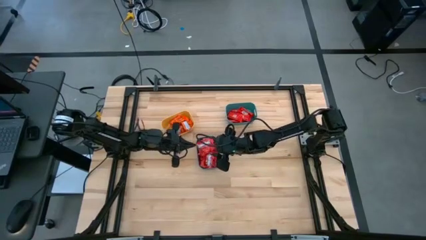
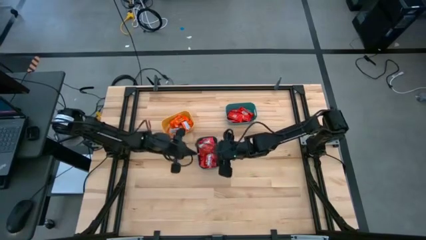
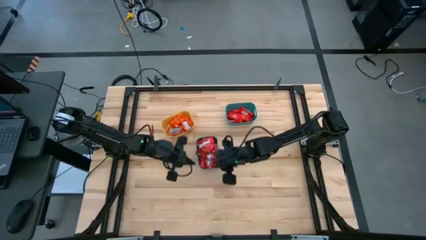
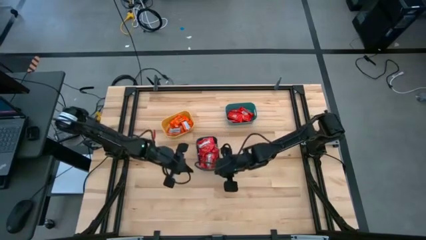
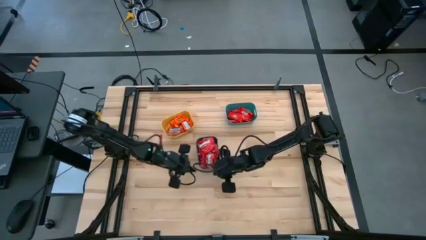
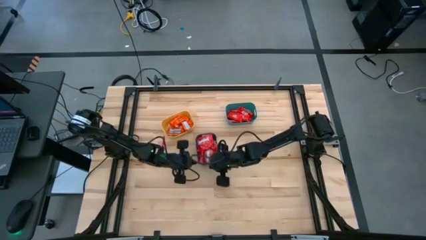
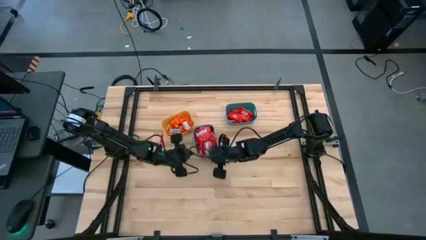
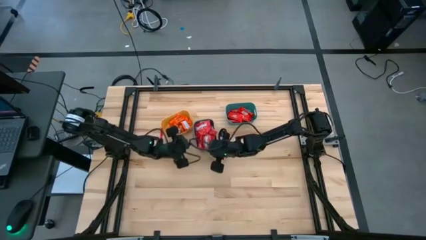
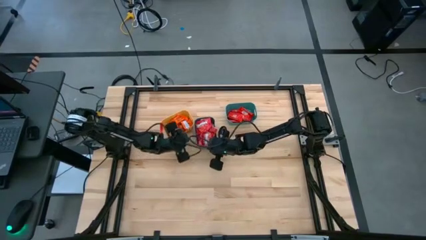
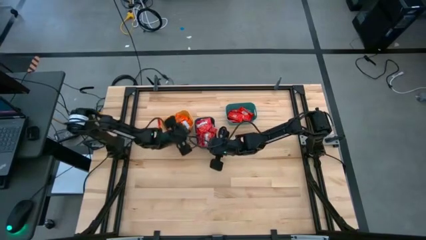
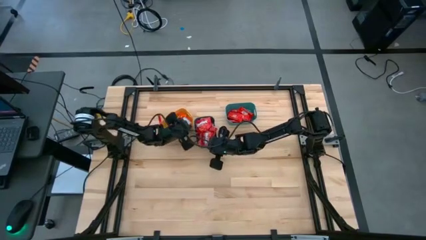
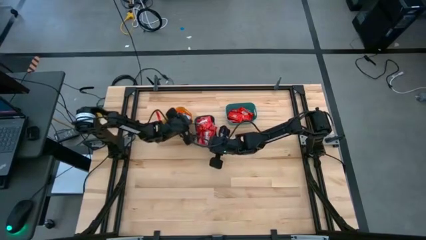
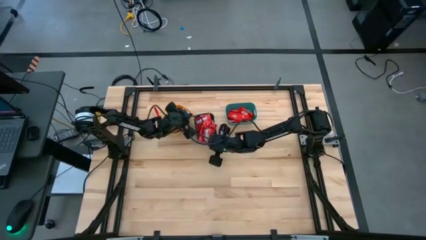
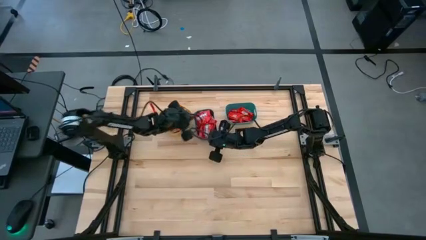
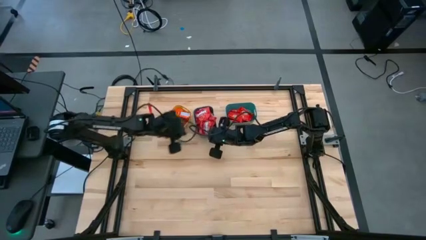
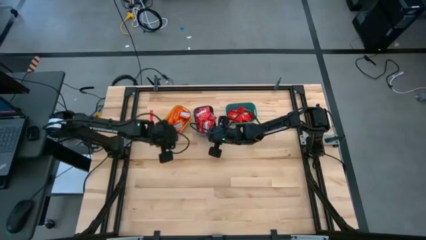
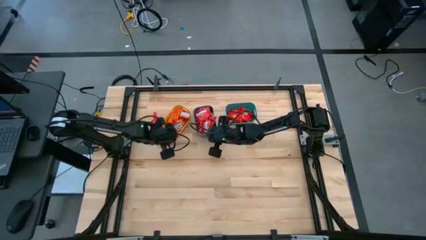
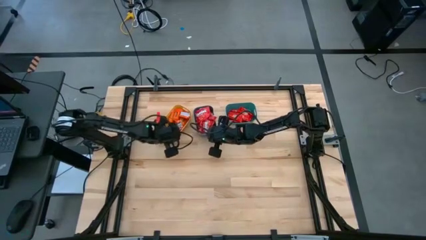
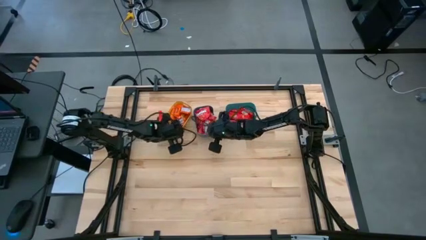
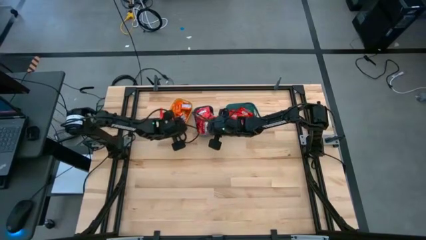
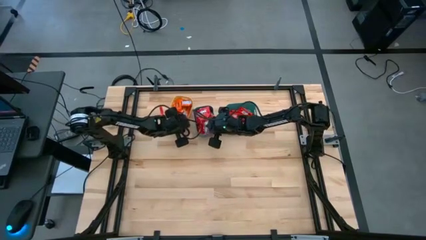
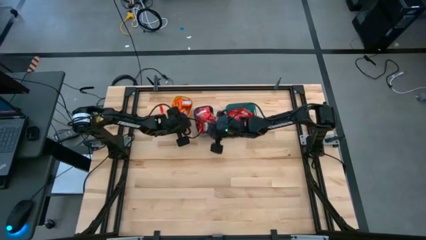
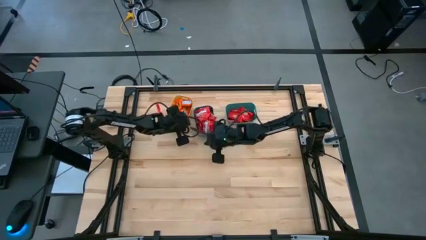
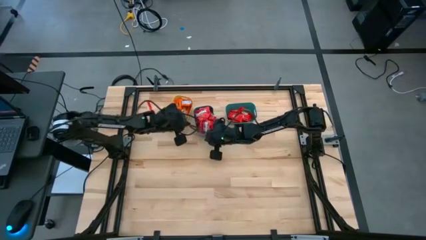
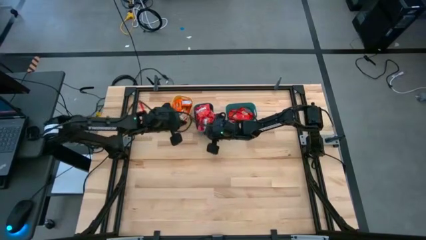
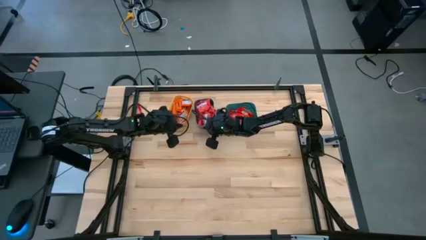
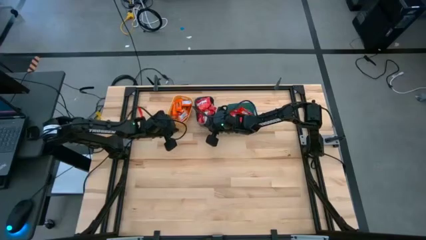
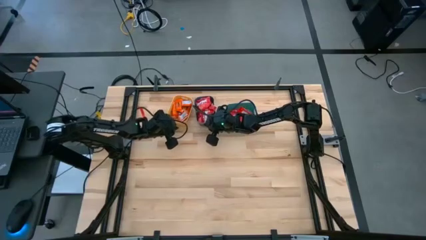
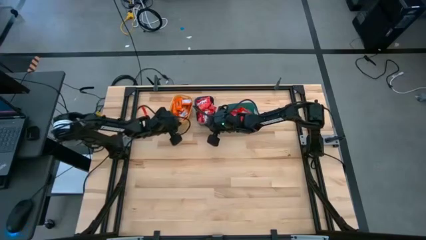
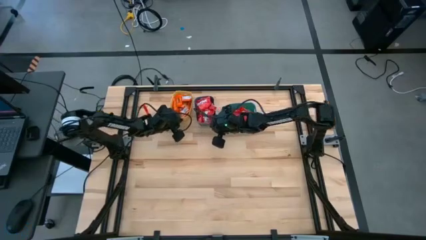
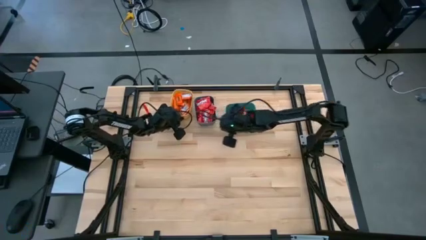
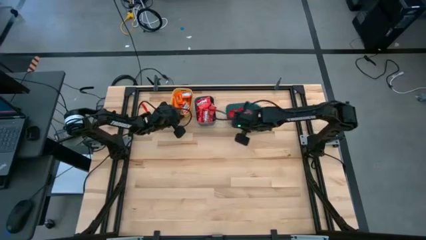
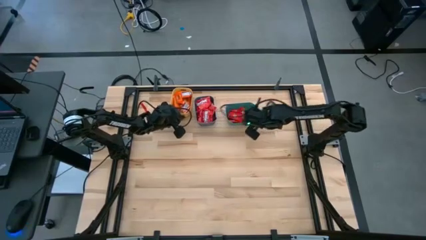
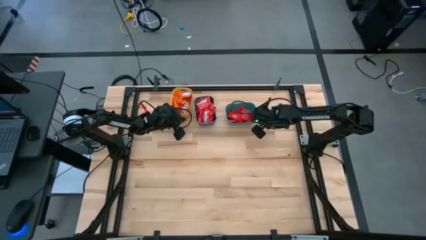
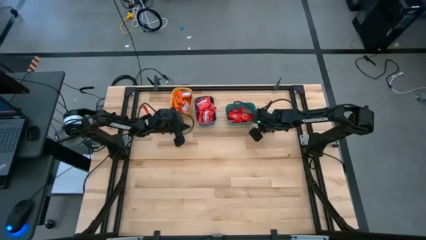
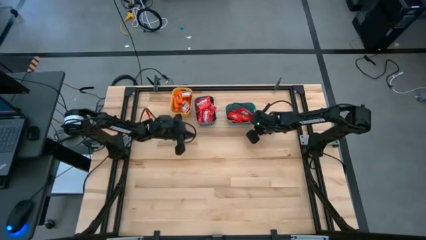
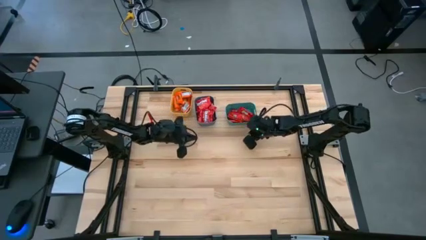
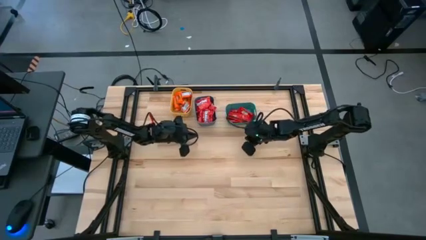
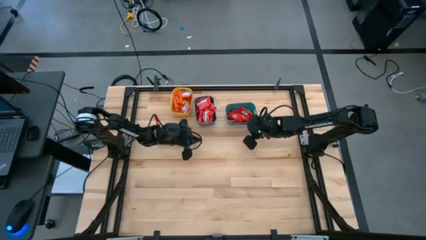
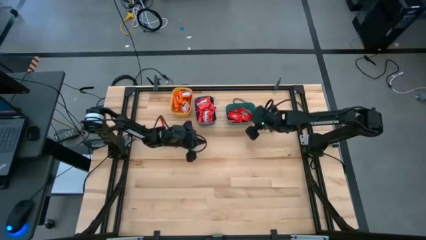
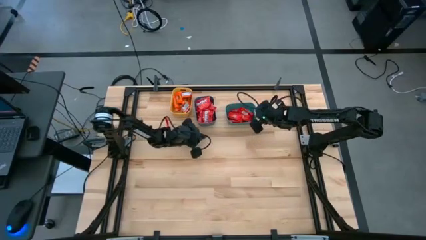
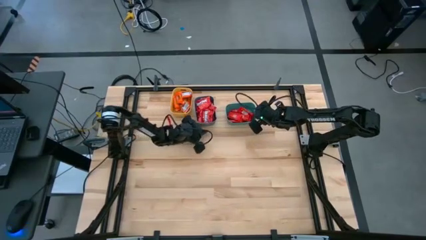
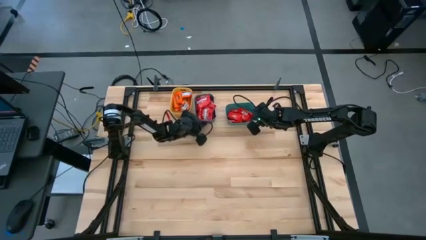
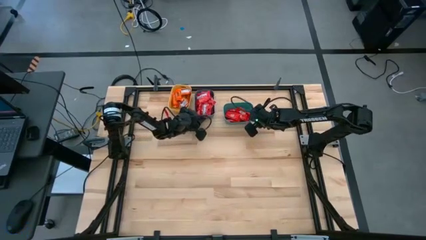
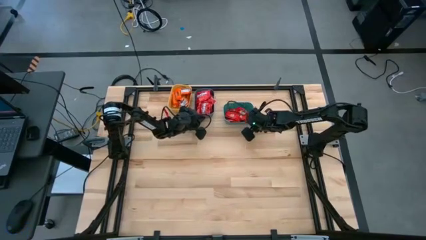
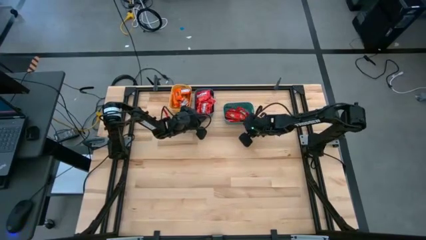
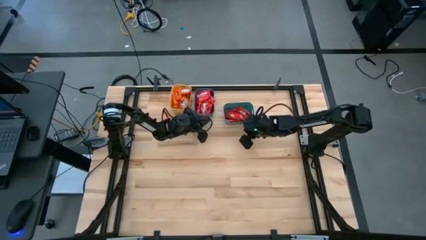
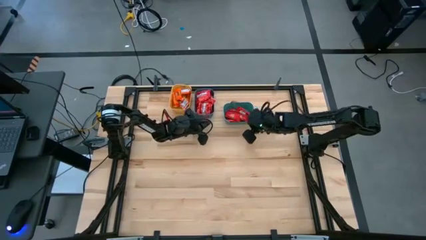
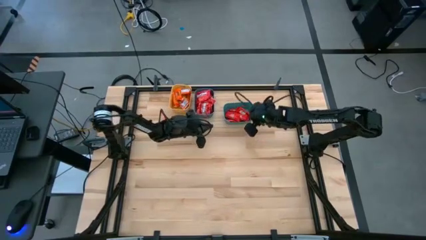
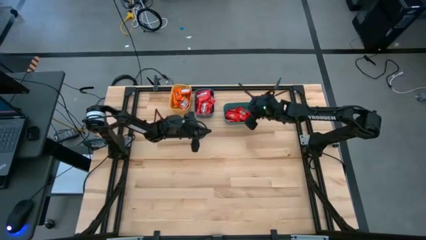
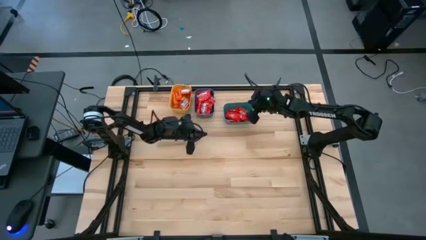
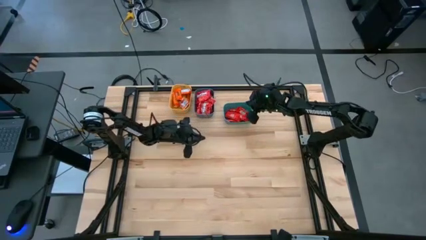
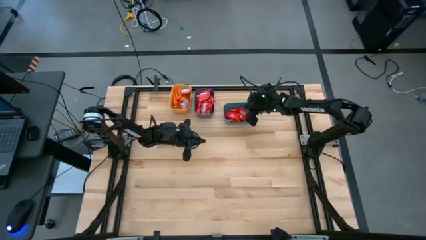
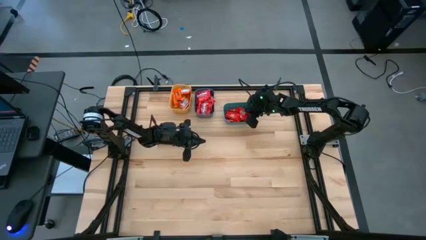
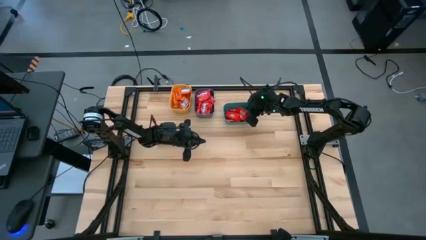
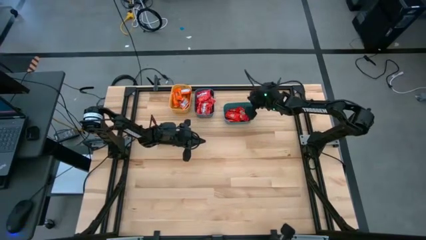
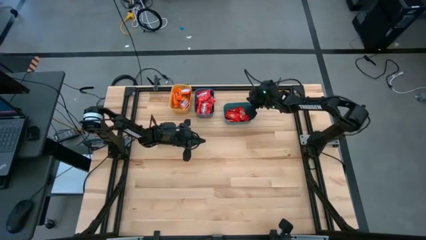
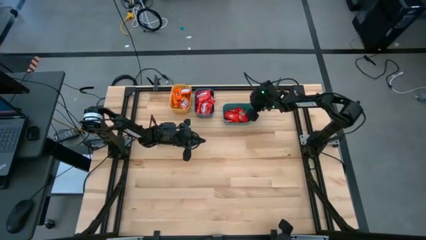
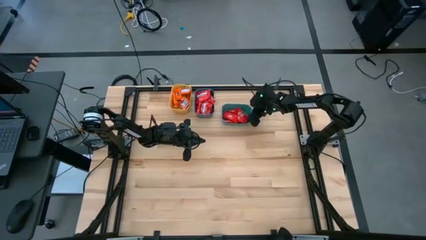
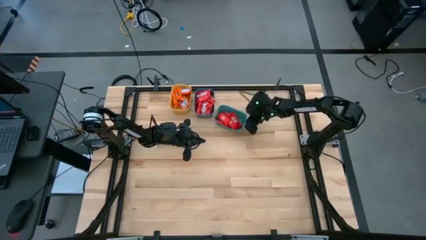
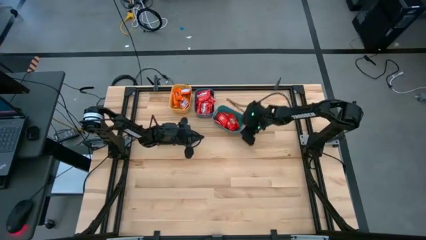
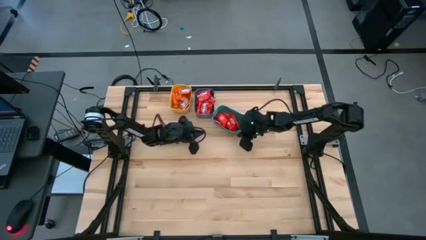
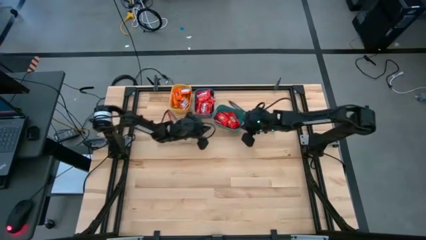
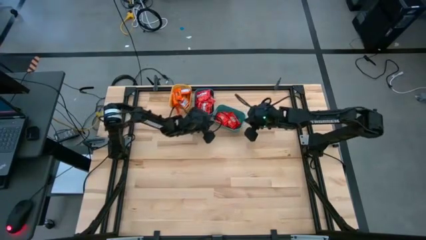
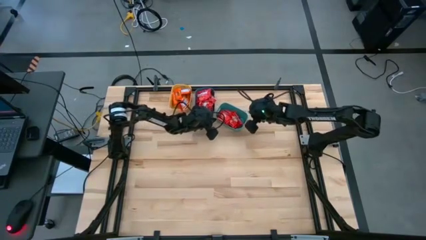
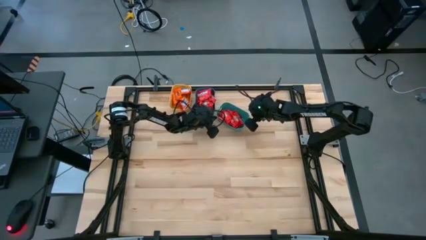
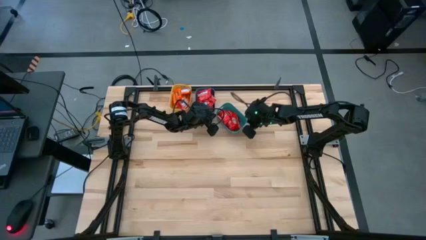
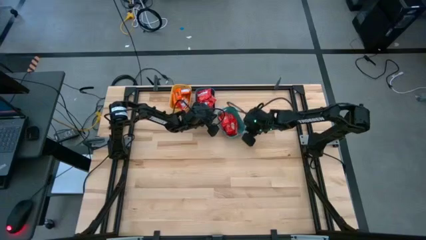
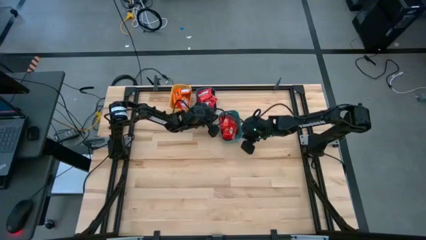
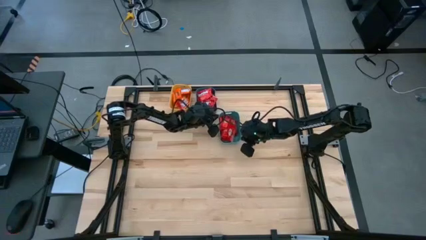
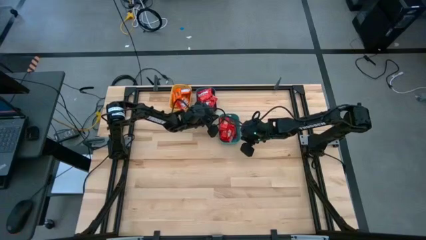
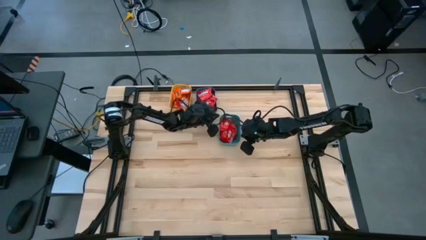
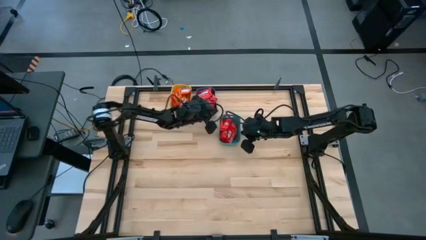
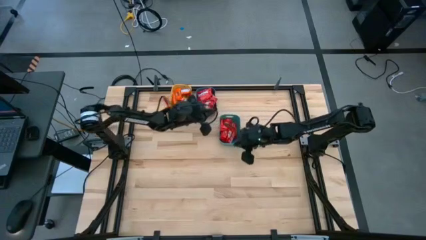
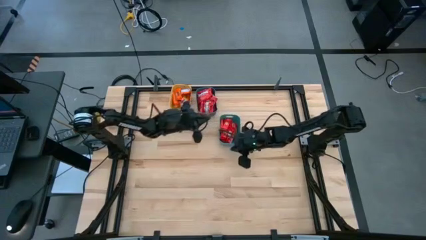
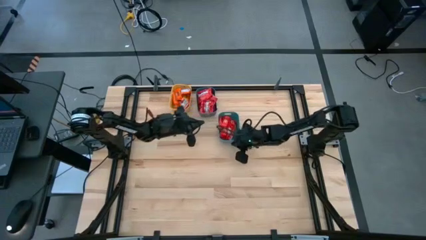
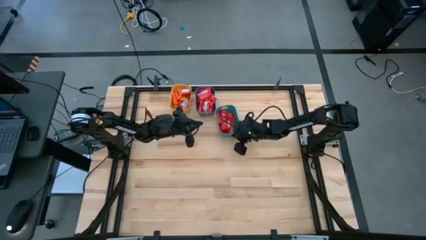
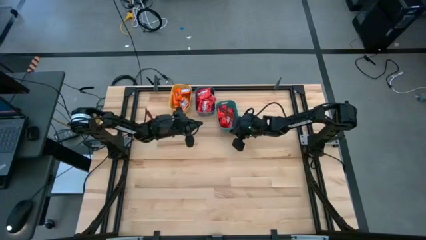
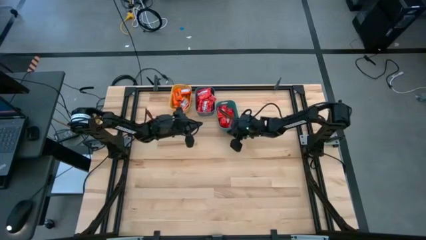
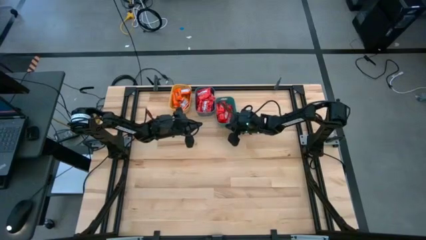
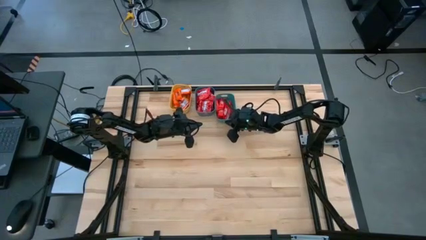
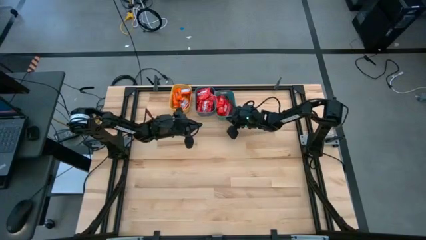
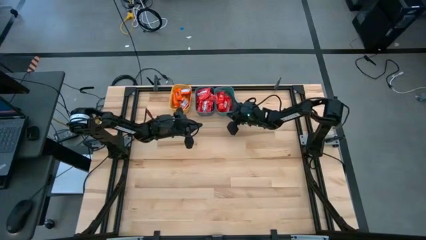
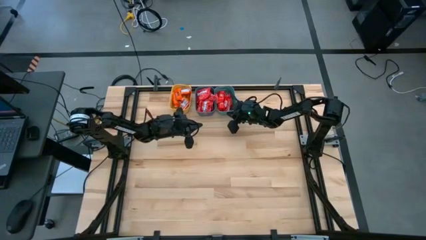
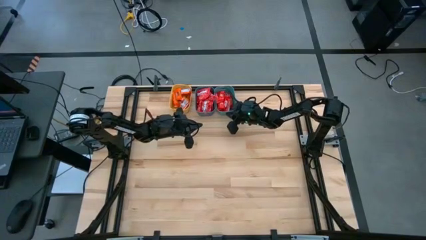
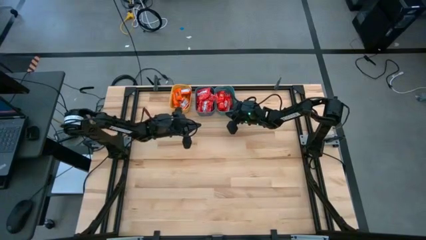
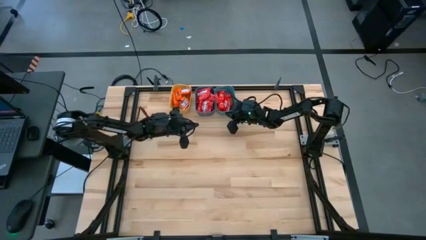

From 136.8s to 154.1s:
Task: Sort candy
Move all the bins to the top corner of the table
